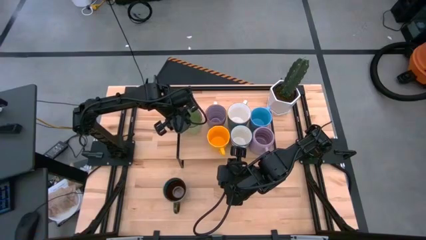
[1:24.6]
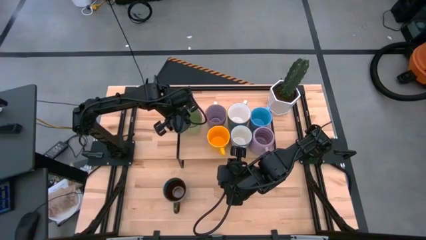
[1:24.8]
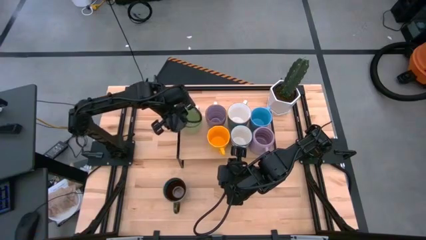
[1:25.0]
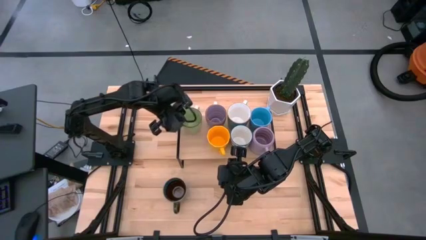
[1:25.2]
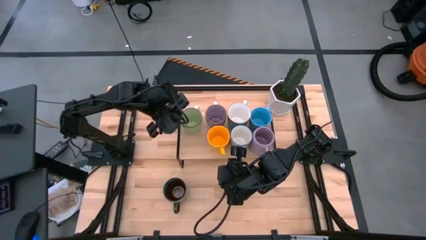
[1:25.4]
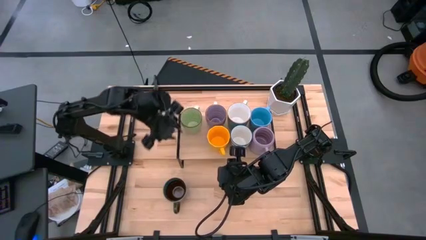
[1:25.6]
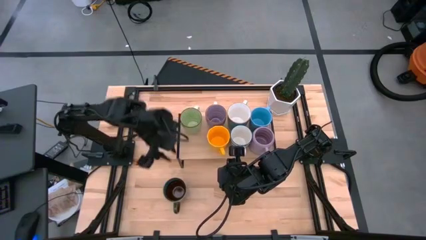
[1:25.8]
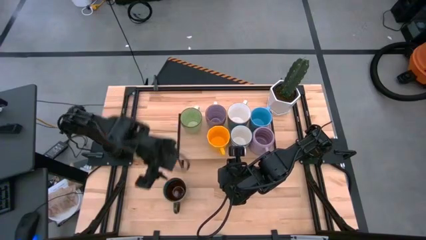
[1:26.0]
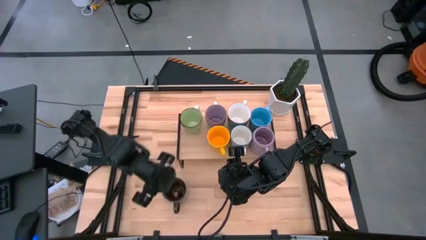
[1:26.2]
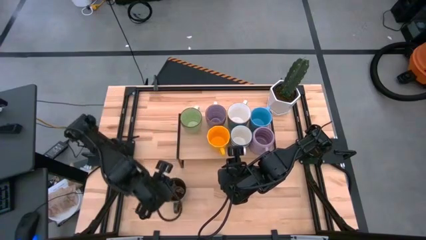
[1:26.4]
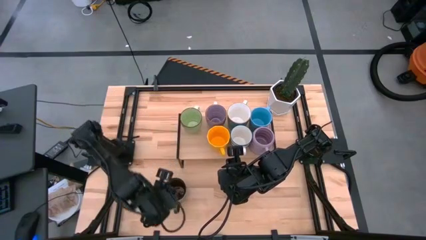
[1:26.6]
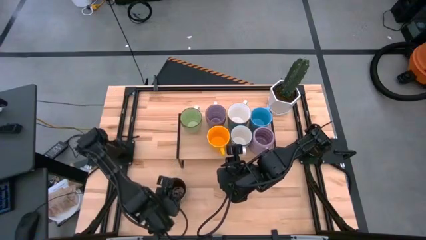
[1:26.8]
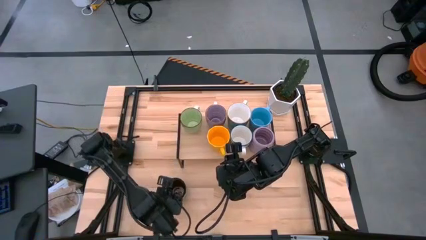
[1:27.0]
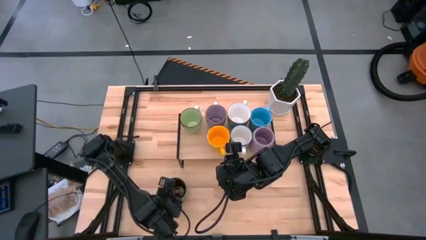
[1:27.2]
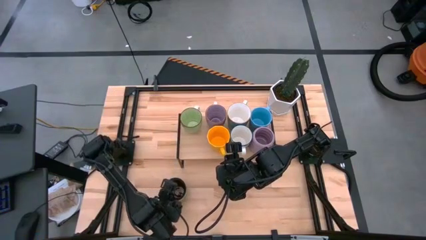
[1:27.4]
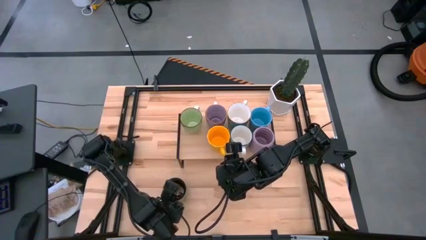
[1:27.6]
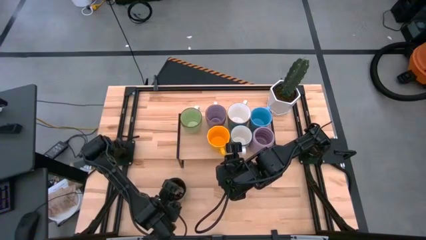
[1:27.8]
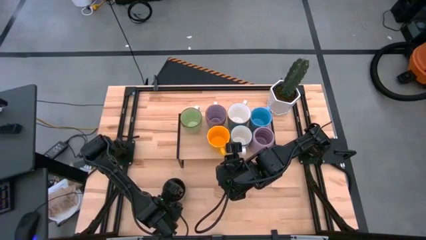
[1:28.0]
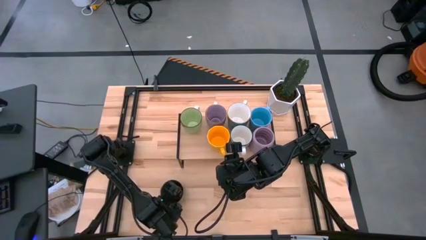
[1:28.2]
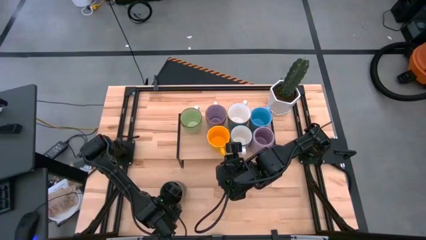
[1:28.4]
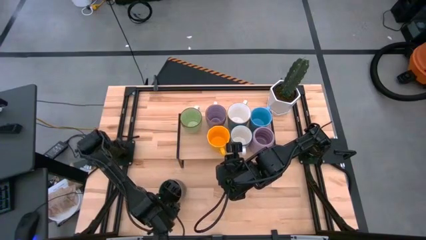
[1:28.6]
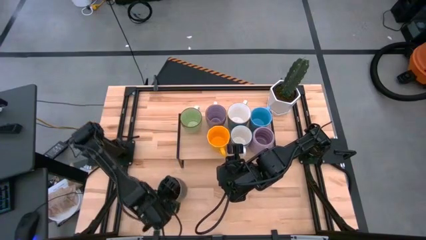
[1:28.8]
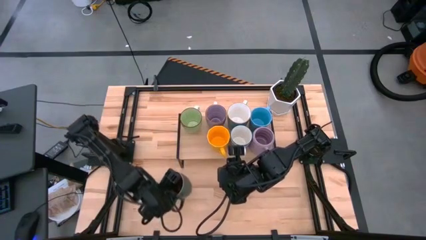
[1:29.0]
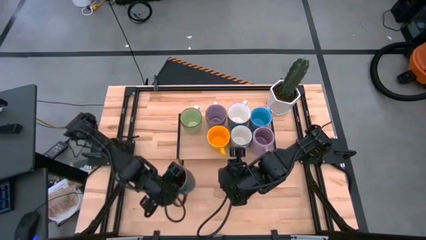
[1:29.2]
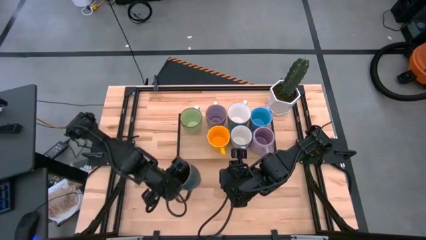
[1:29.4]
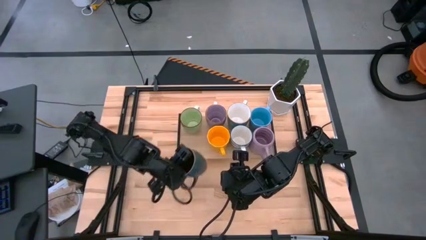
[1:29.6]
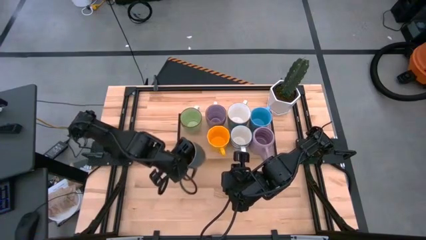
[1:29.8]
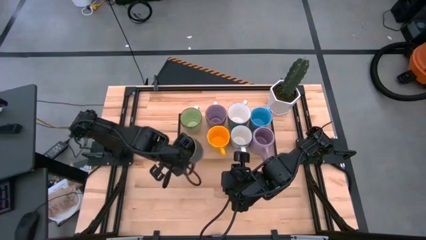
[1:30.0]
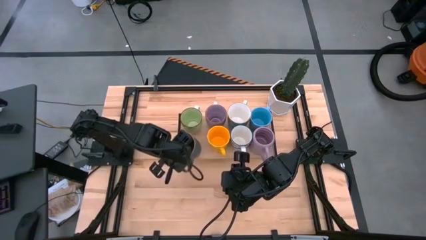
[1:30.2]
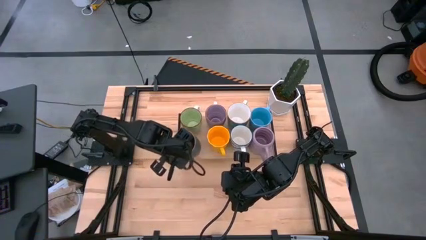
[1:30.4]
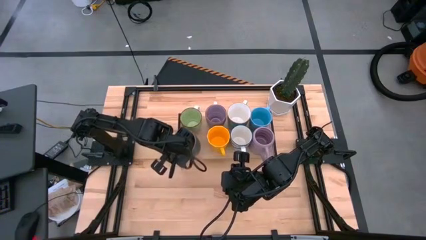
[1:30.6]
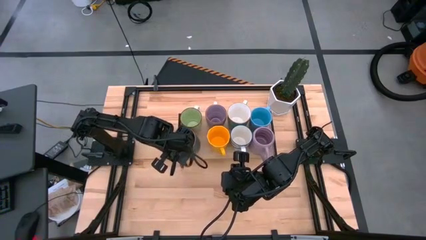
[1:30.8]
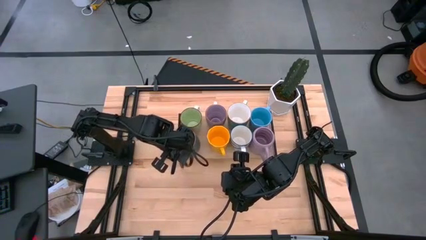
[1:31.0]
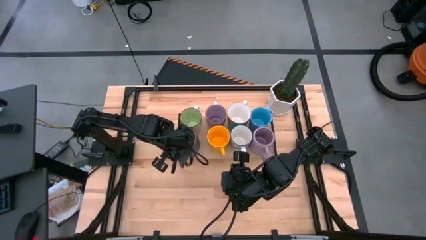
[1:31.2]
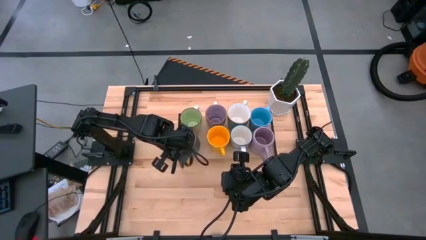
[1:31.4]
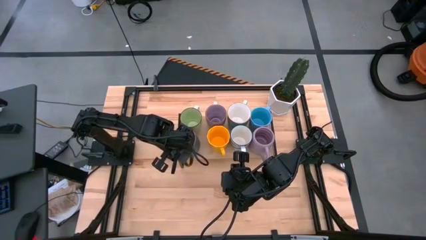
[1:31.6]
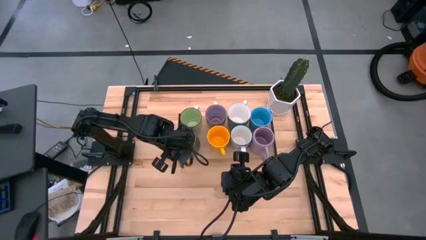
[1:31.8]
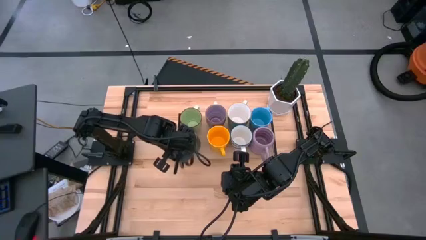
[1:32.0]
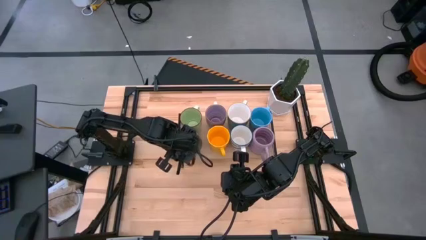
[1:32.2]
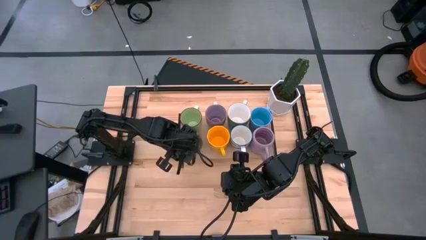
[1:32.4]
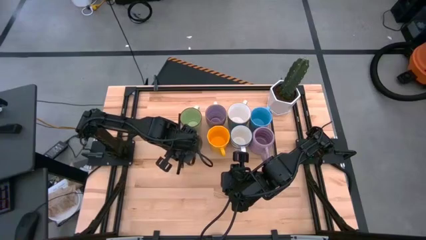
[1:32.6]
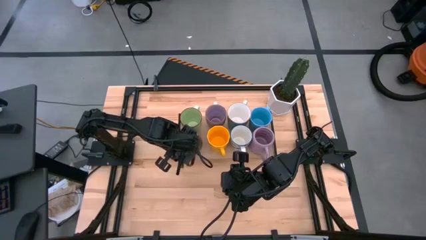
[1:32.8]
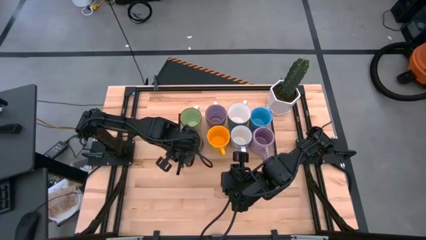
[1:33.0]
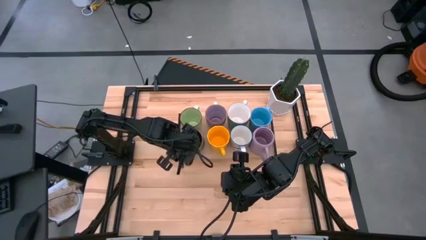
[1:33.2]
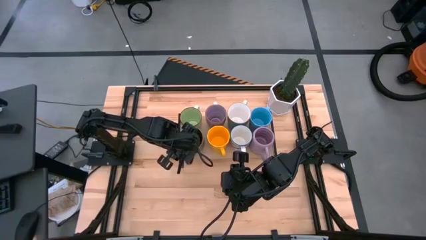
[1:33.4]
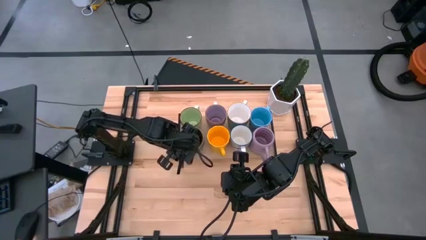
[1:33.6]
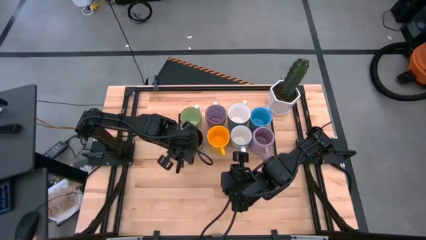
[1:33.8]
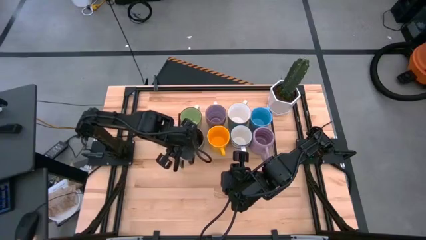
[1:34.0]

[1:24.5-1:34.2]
Task: Place coffee mugs
Put the brown cup on the shelf aligned with the green cup

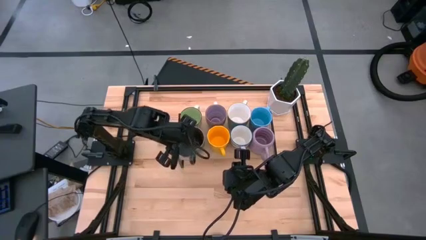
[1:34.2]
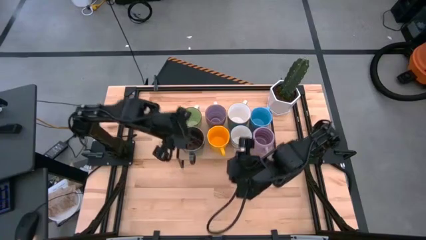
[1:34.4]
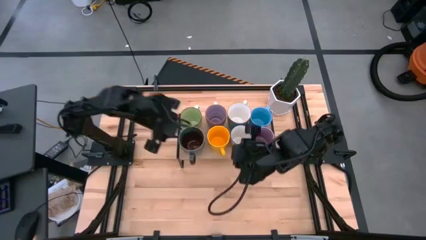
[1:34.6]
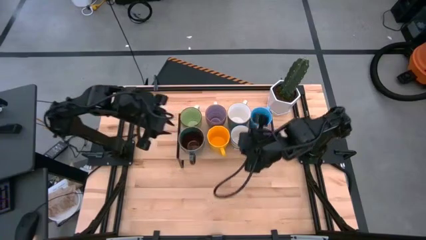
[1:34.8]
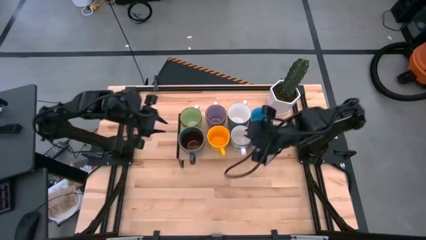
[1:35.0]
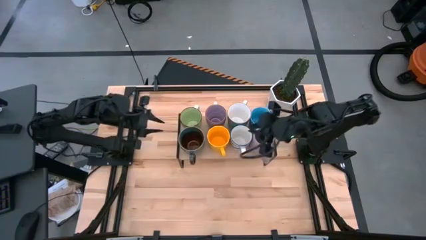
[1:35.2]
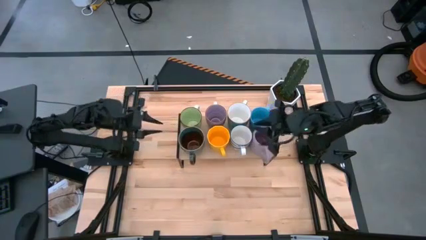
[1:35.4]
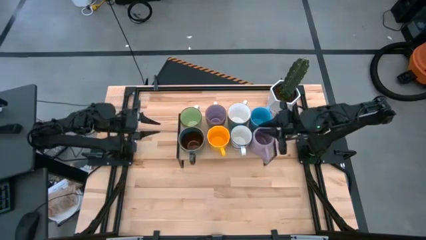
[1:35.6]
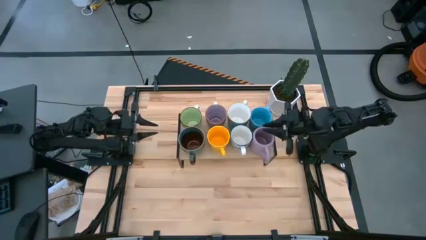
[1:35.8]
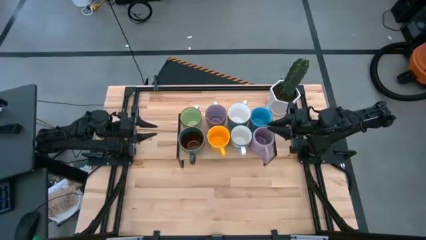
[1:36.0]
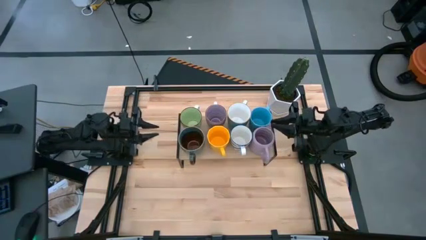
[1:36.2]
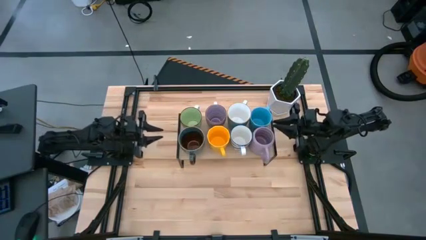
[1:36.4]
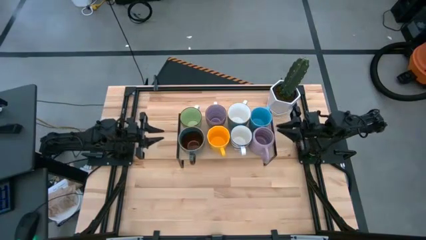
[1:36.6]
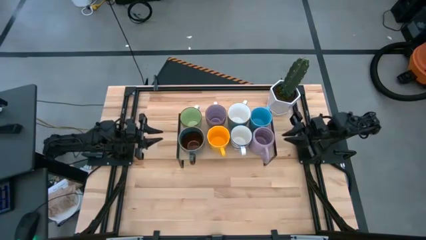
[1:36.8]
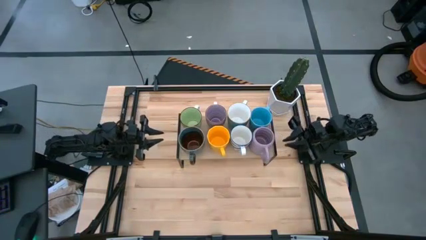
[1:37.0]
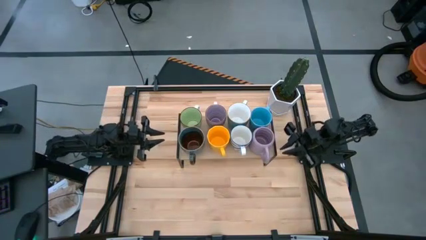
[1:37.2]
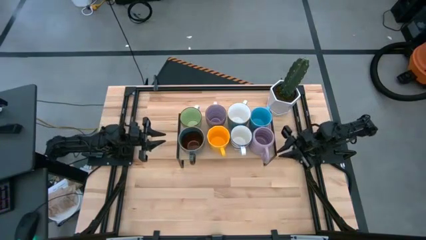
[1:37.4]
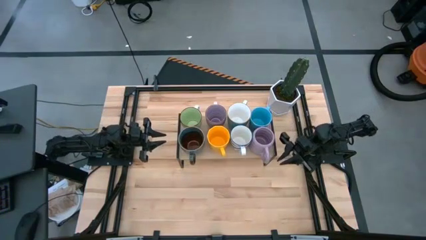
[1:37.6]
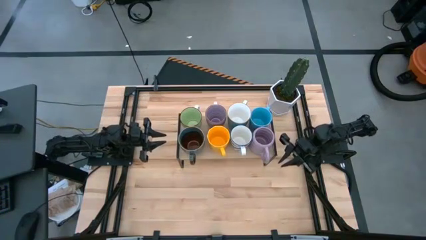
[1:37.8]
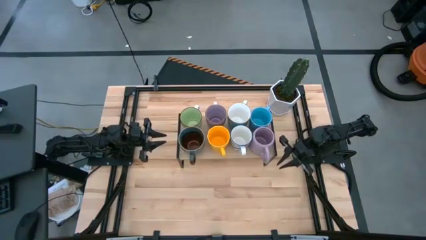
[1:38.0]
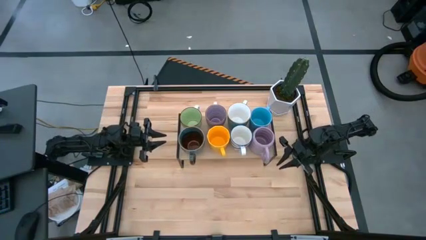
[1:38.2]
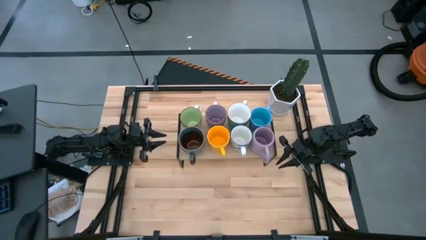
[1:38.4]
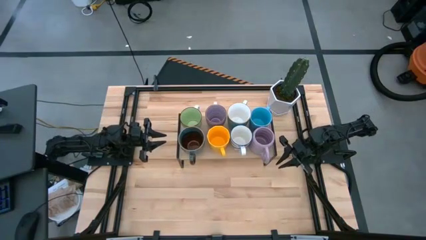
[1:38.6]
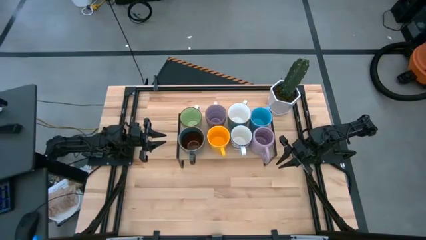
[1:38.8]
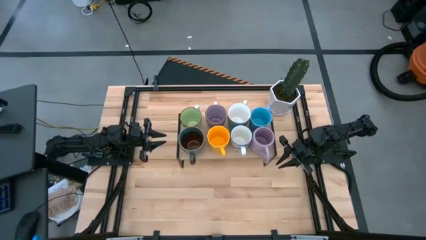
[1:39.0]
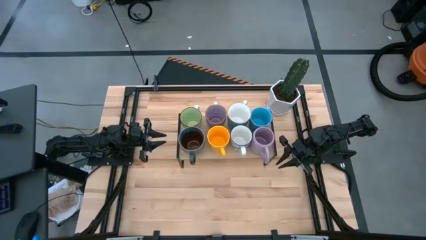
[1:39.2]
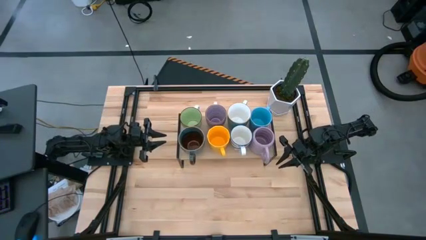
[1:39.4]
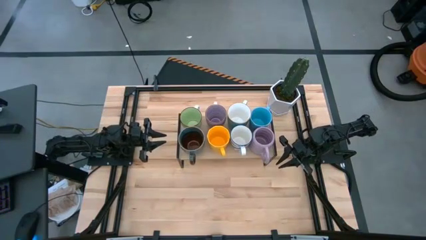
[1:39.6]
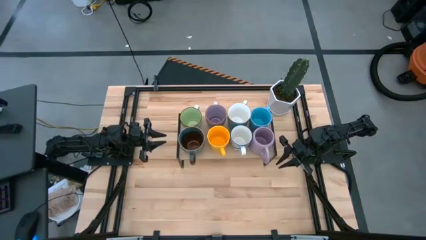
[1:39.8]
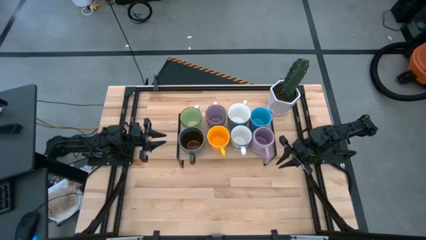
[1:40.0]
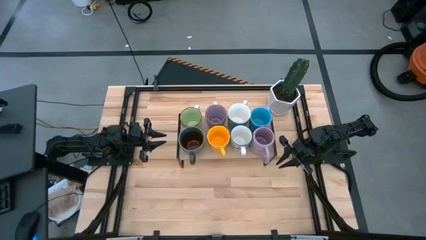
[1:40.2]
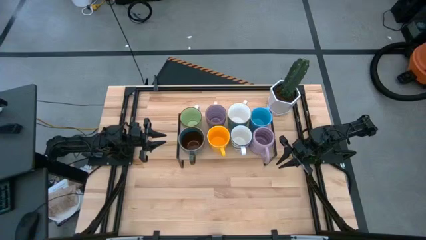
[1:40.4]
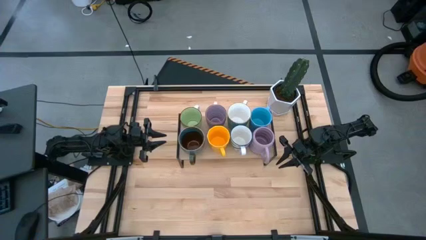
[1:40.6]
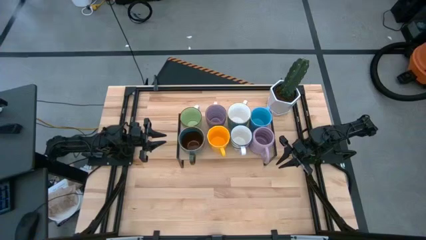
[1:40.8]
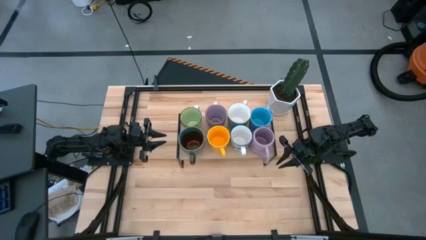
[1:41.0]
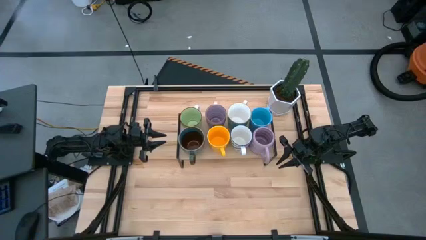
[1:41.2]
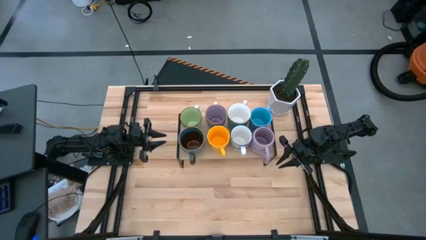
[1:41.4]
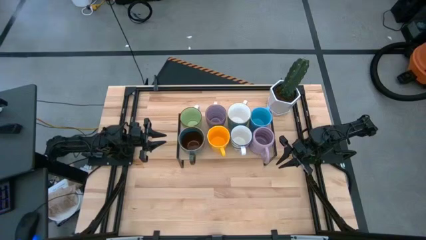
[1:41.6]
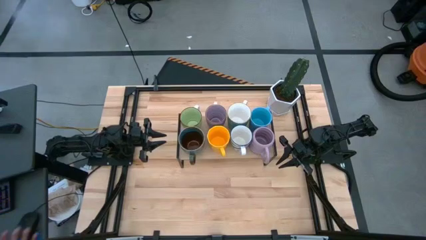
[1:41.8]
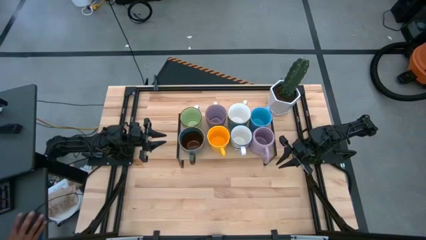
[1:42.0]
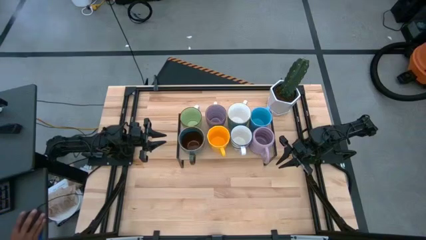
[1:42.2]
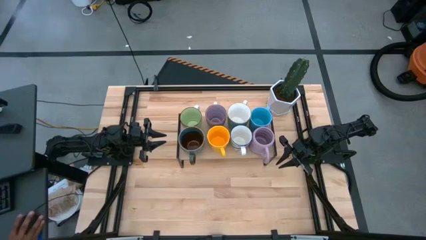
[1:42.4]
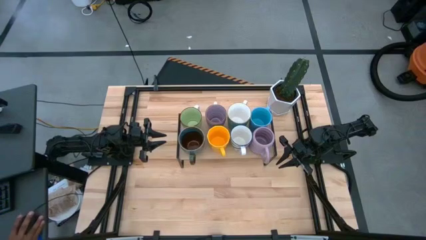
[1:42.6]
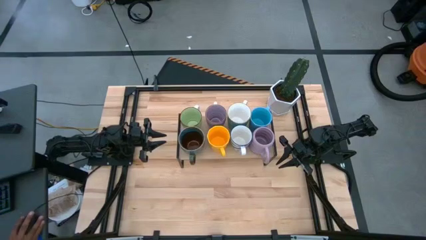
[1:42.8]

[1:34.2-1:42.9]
Return to Home Position
